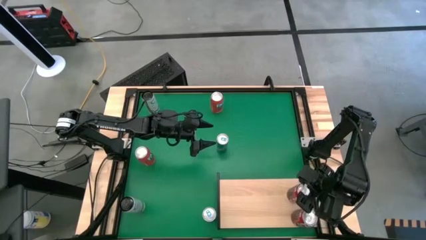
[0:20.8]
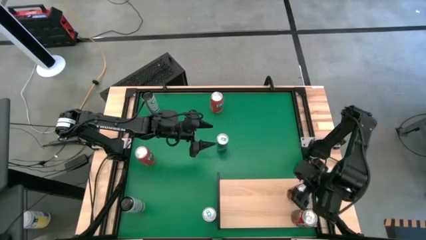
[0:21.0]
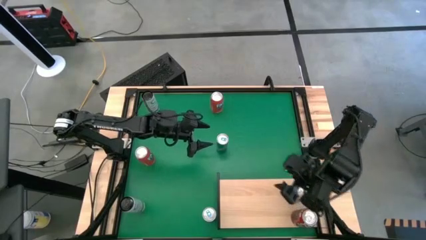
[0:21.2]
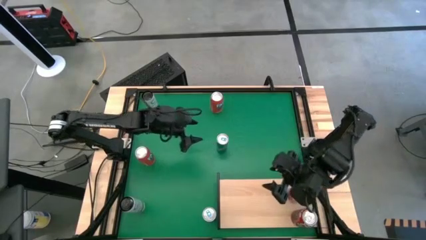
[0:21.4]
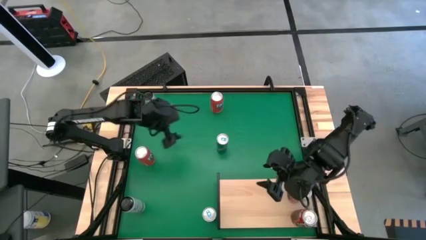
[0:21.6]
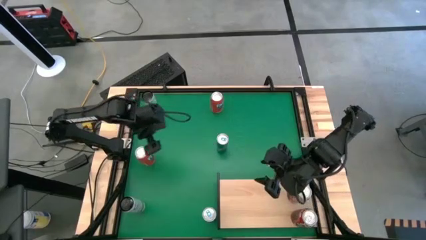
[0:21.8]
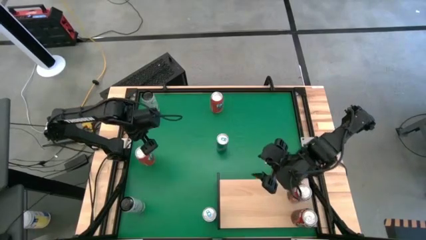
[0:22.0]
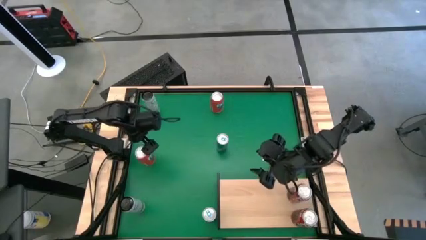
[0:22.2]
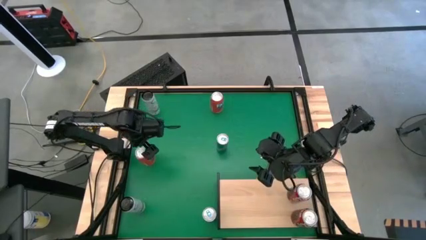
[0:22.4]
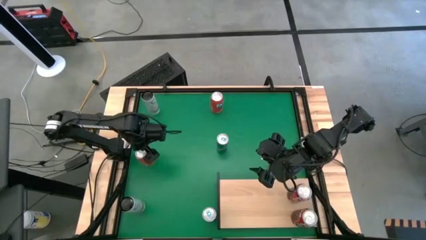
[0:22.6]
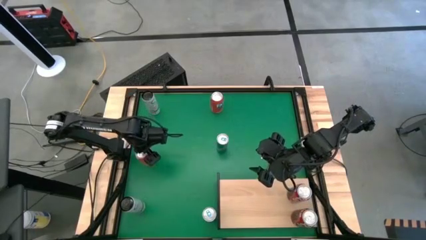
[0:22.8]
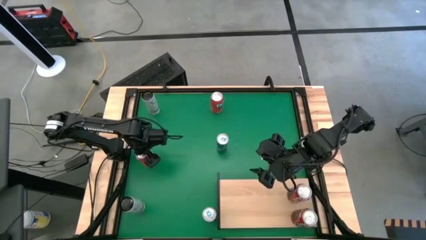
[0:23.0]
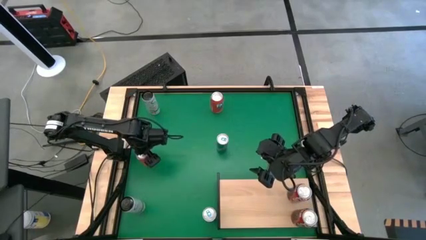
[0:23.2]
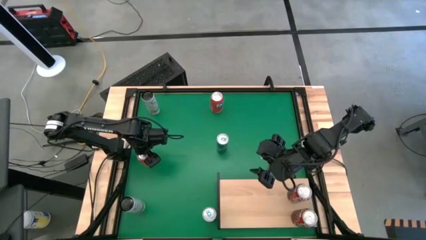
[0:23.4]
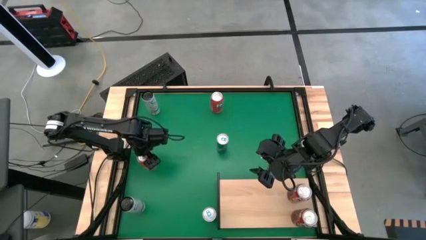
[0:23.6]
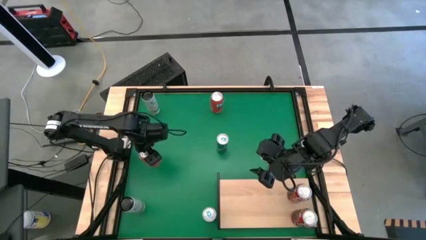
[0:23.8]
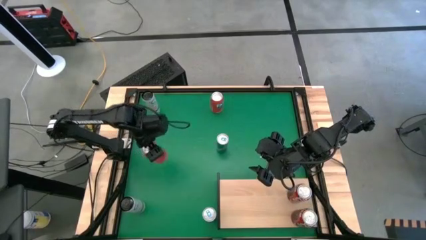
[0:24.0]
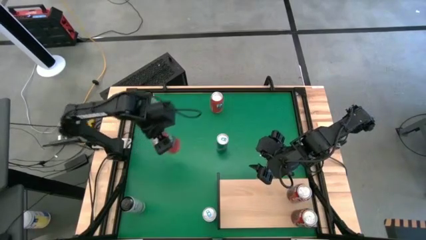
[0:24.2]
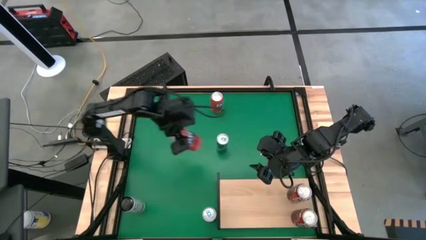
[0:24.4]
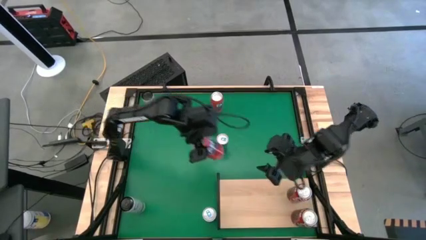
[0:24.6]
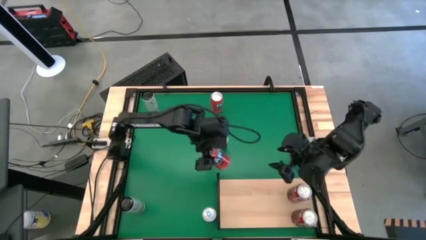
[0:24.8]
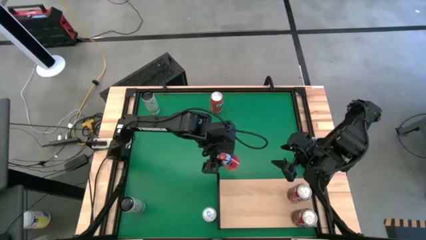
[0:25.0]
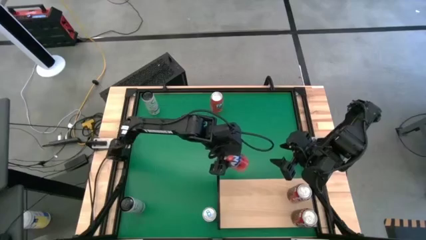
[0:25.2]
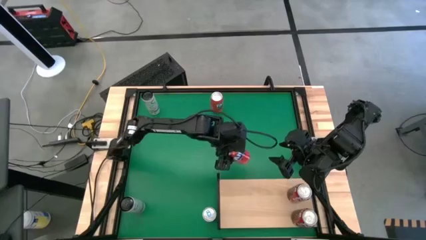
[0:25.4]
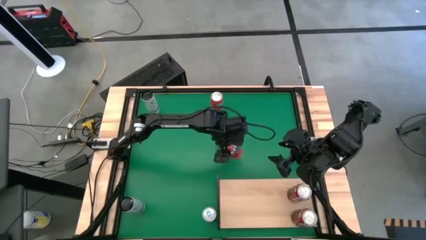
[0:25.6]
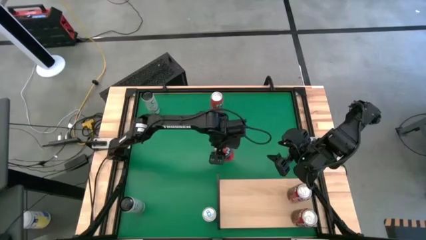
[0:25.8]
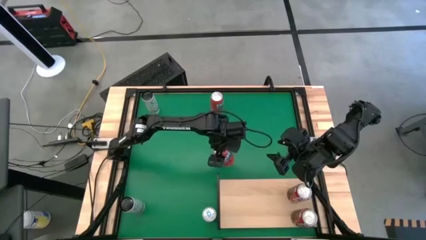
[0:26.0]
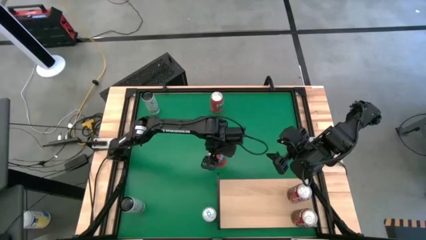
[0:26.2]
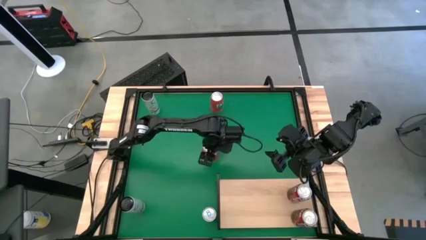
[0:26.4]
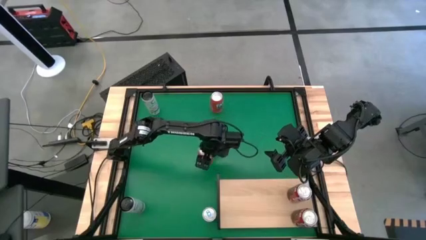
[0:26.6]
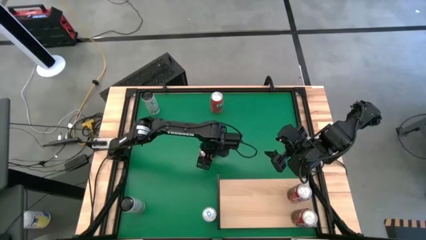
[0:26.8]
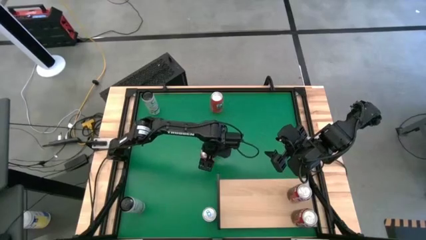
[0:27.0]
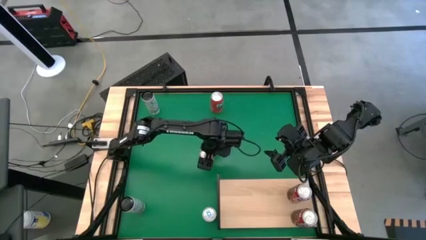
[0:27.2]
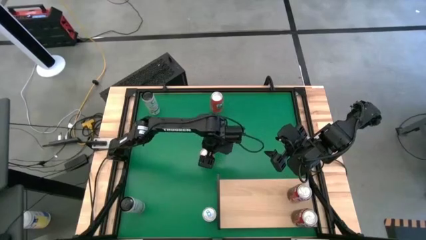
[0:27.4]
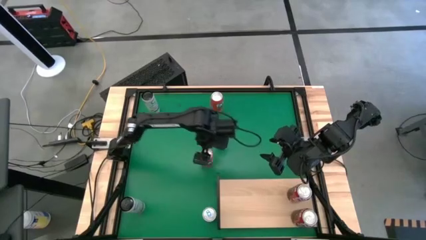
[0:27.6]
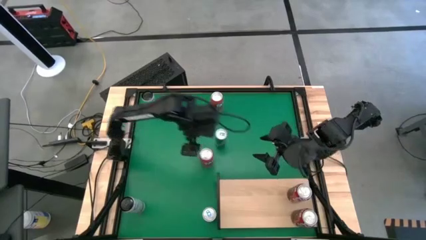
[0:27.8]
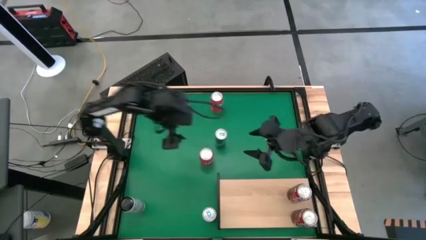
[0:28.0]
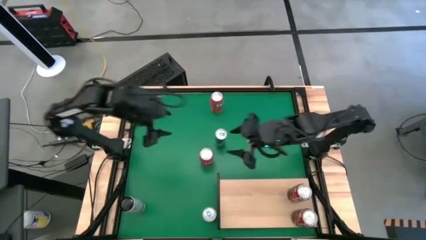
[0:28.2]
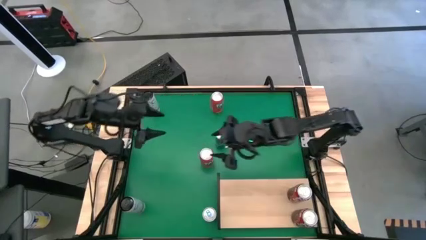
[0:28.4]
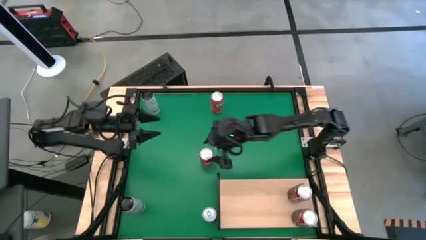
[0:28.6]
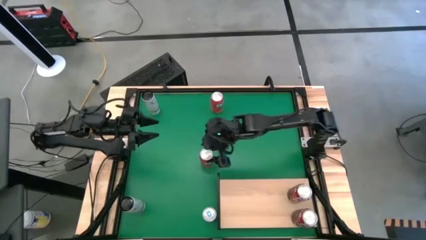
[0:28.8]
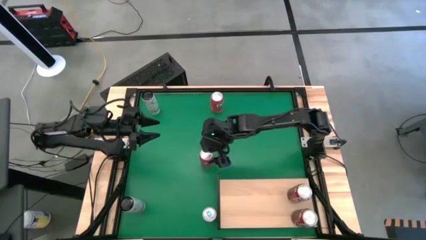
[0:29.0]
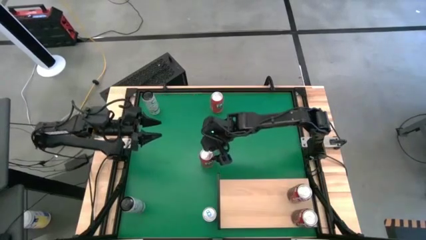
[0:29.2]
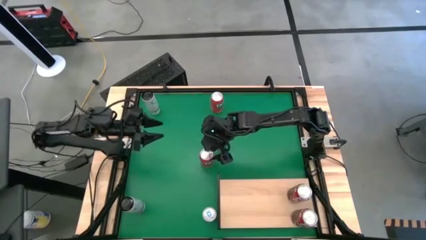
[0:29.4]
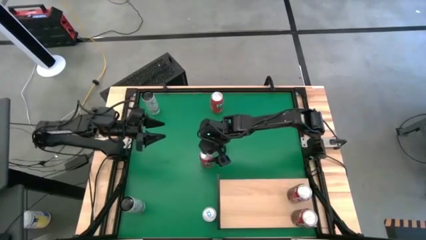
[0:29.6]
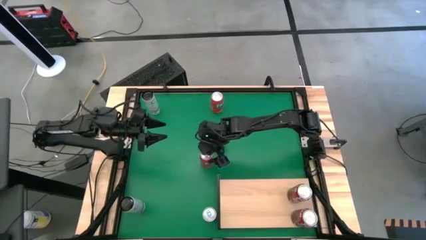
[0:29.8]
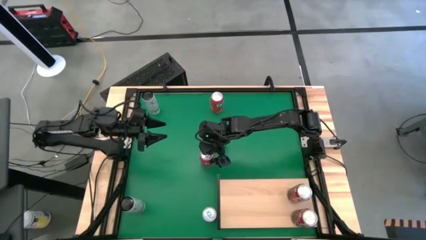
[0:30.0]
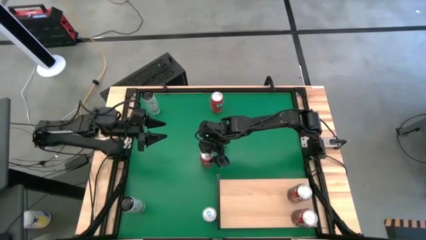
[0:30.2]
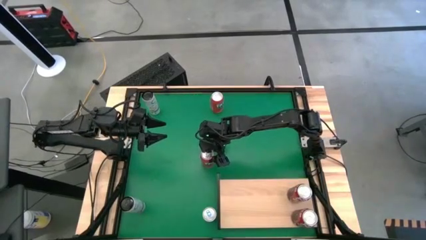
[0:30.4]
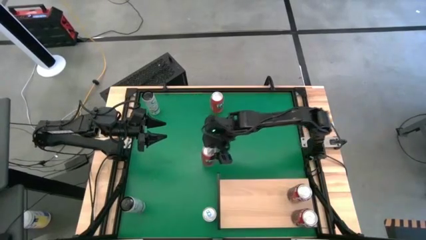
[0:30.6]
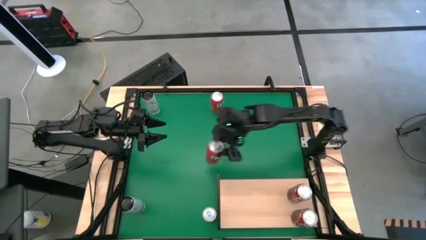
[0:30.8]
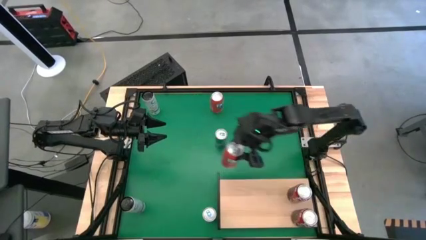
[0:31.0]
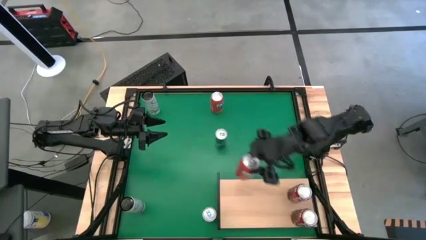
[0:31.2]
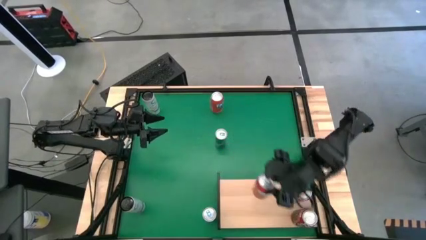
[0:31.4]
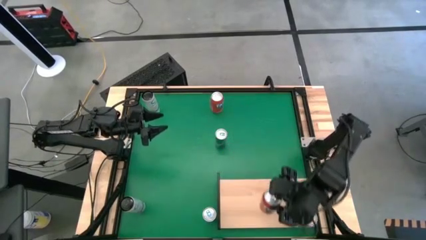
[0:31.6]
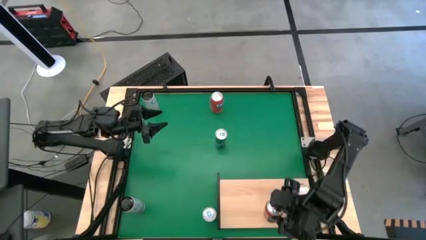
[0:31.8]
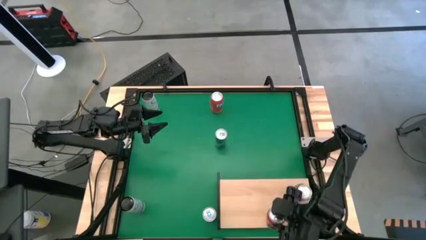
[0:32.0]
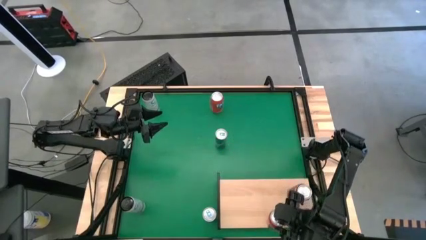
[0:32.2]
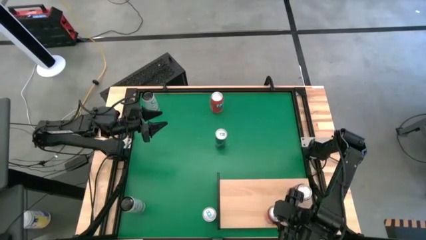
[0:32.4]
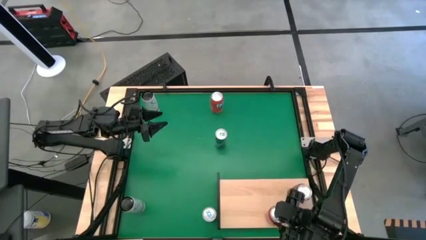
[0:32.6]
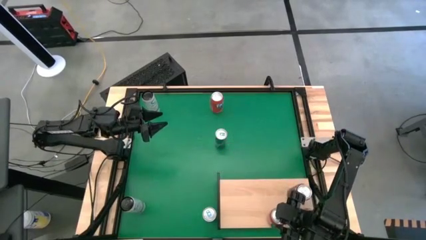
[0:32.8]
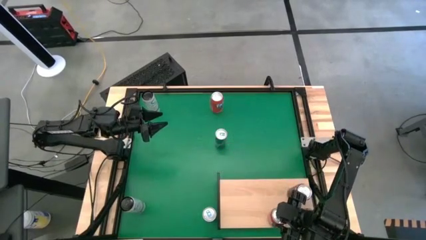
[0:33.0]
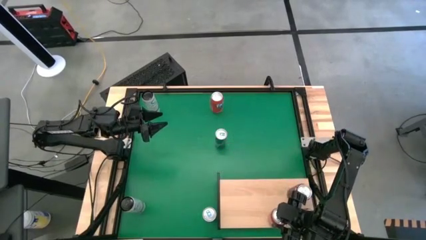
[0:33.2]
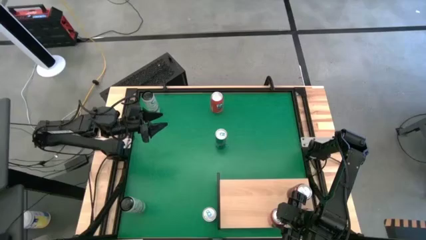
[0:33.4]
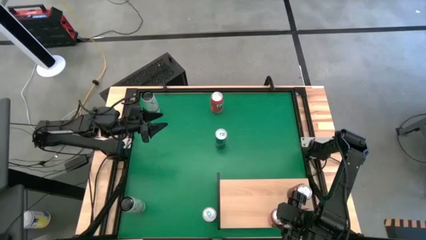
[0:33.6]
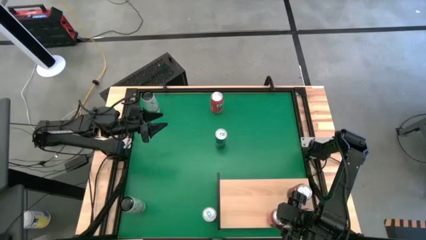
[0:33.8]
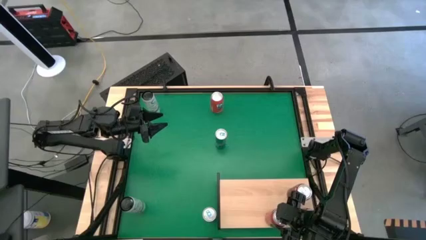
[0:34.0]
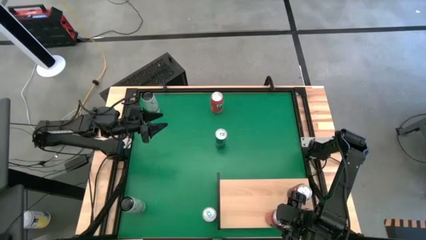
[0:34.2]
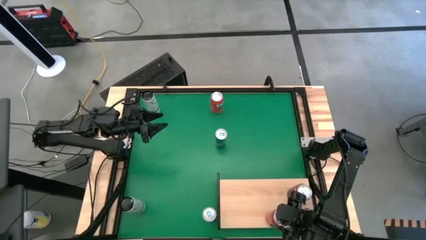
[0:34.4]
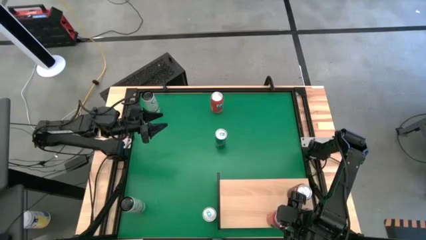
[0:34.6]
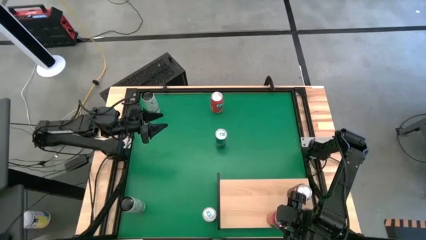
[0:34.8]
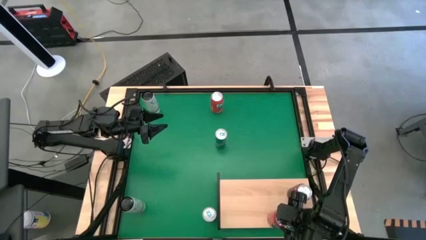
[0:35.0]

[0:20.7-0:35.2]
Task: Place canned beverage on shelf
Put the bottom red soda can on the shelf
